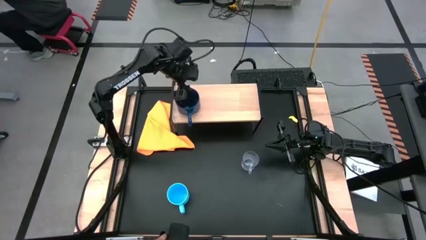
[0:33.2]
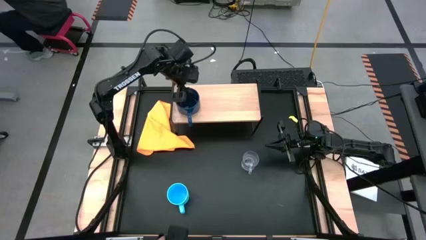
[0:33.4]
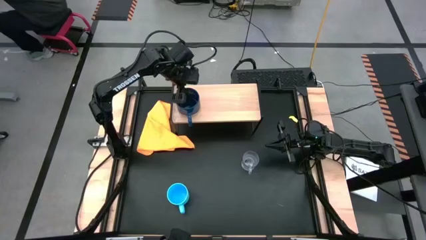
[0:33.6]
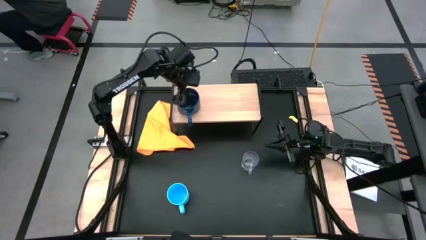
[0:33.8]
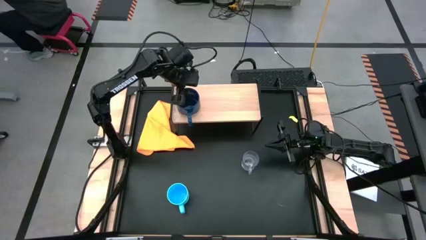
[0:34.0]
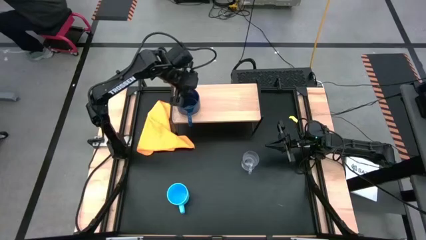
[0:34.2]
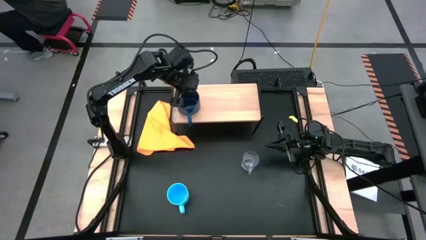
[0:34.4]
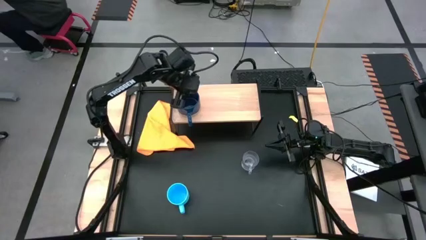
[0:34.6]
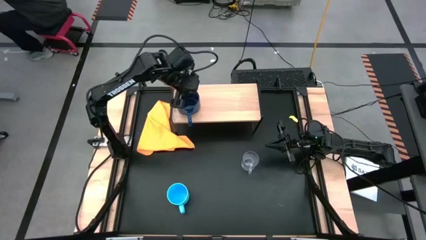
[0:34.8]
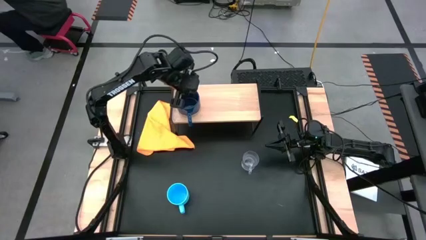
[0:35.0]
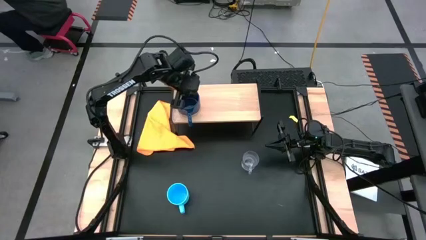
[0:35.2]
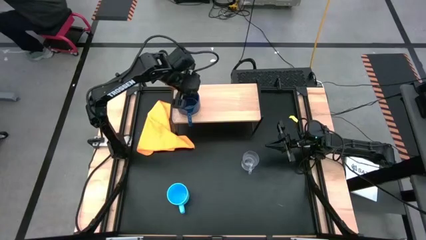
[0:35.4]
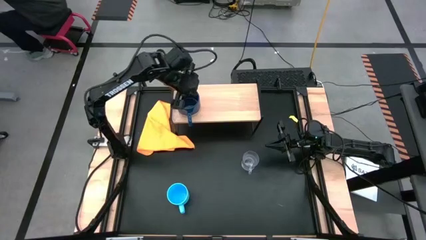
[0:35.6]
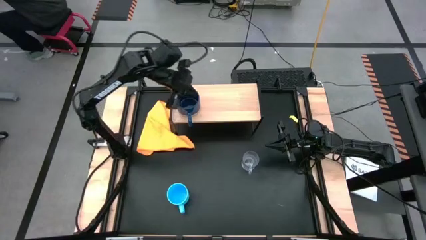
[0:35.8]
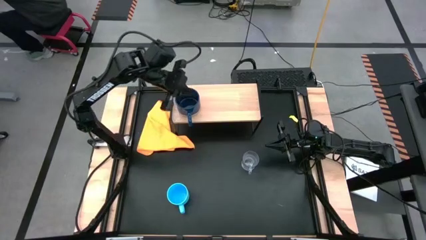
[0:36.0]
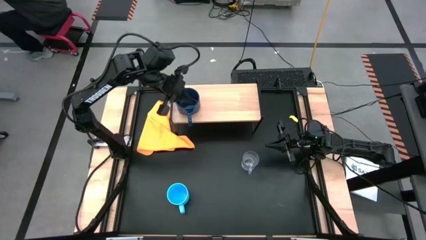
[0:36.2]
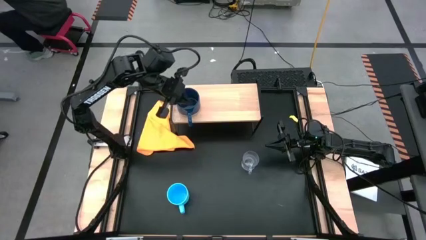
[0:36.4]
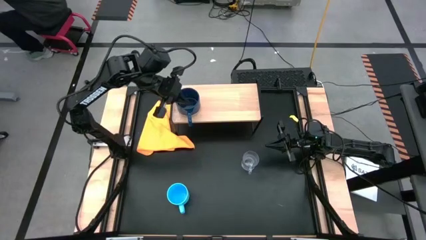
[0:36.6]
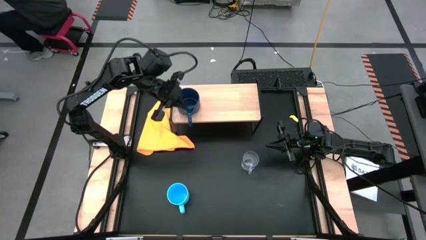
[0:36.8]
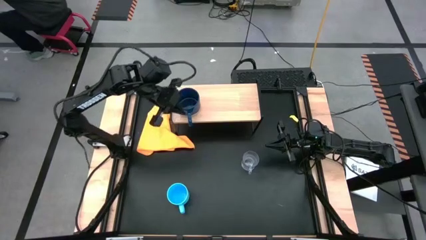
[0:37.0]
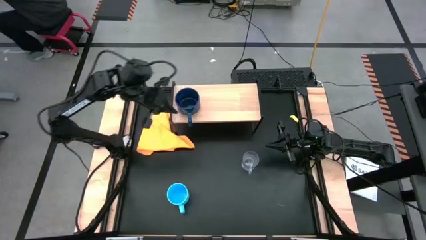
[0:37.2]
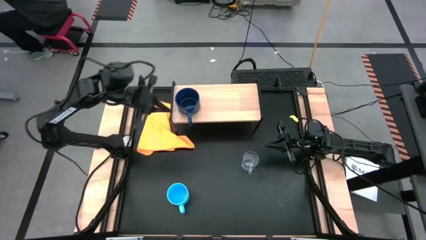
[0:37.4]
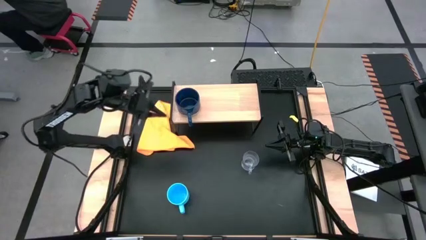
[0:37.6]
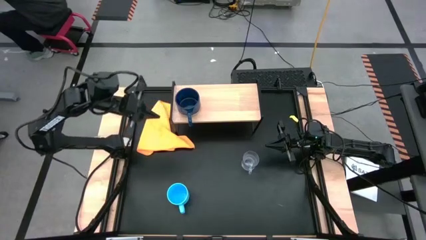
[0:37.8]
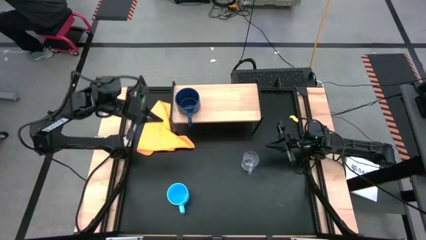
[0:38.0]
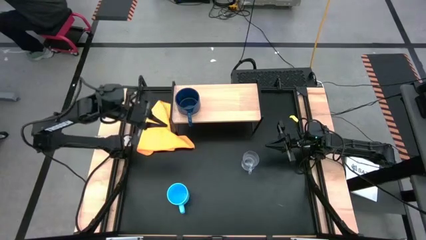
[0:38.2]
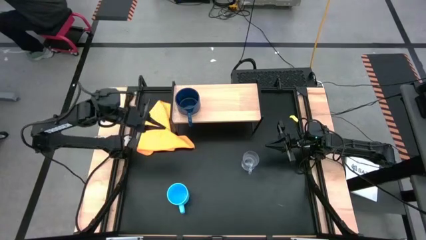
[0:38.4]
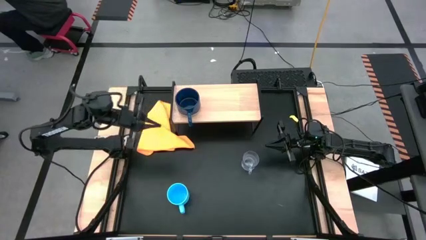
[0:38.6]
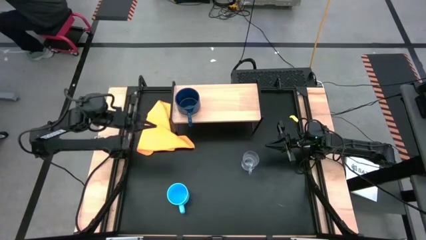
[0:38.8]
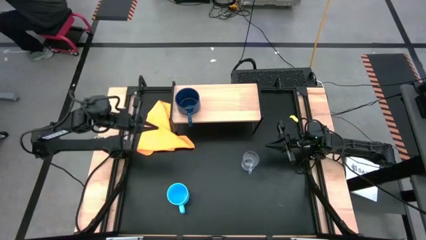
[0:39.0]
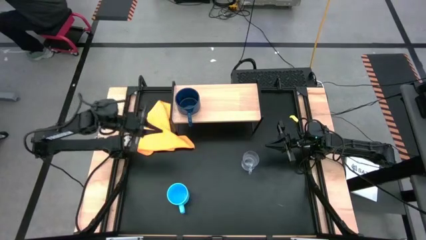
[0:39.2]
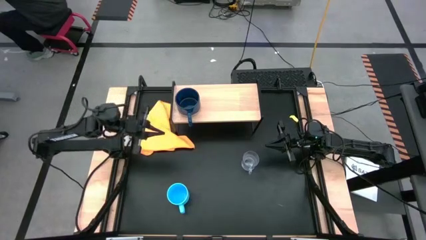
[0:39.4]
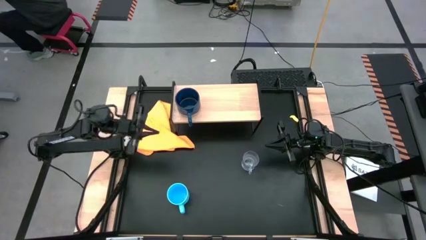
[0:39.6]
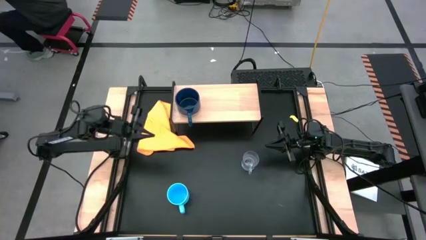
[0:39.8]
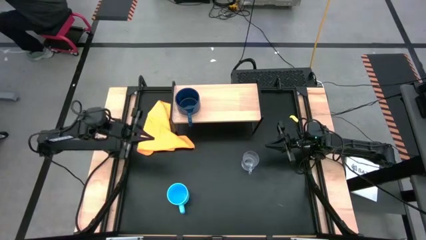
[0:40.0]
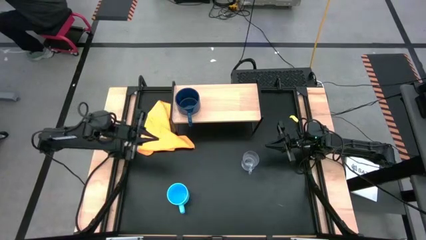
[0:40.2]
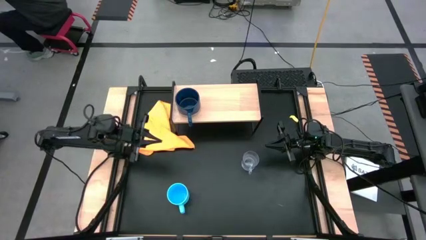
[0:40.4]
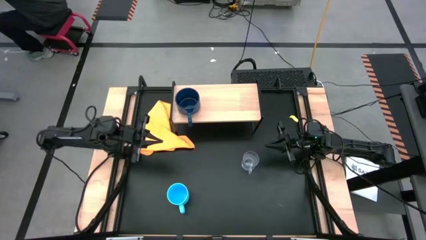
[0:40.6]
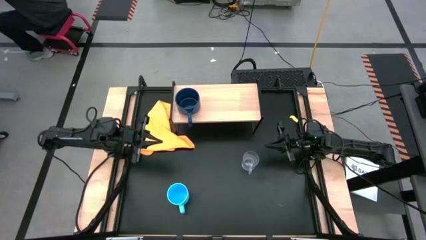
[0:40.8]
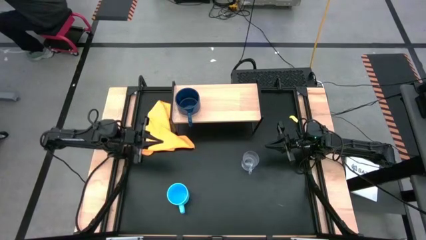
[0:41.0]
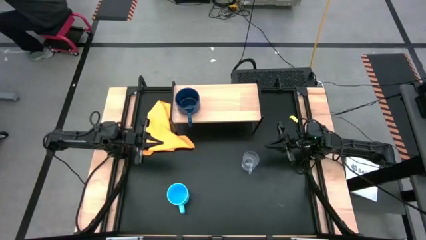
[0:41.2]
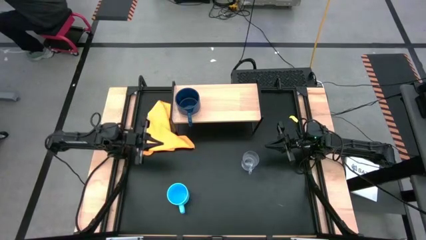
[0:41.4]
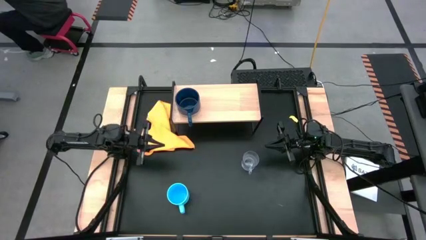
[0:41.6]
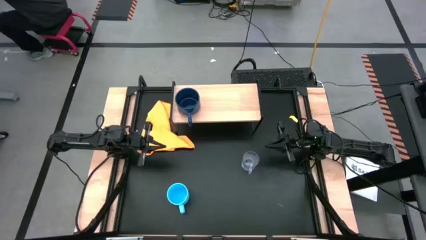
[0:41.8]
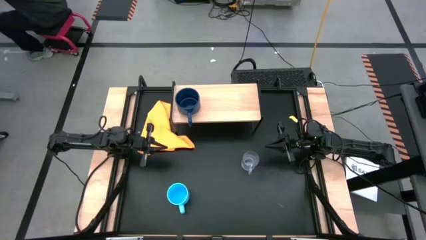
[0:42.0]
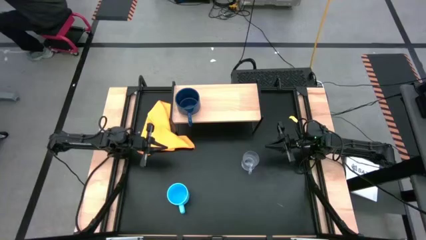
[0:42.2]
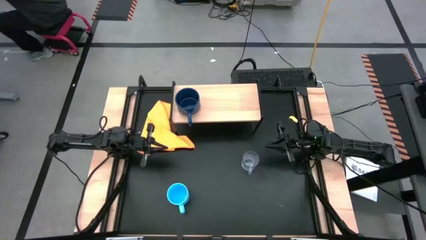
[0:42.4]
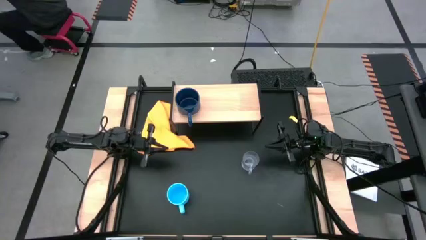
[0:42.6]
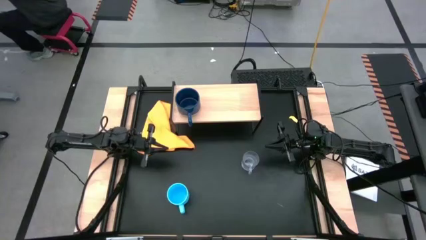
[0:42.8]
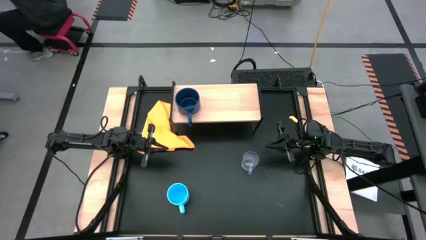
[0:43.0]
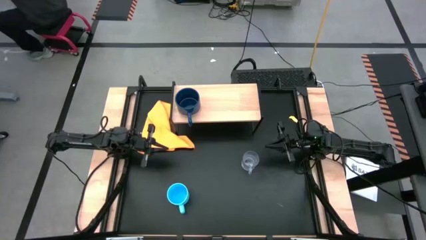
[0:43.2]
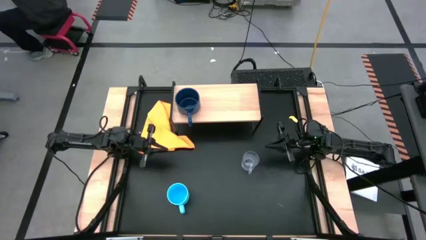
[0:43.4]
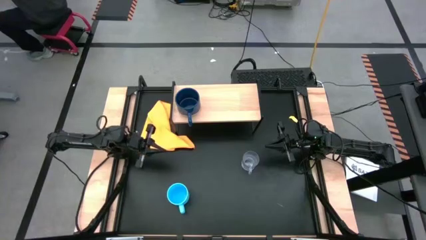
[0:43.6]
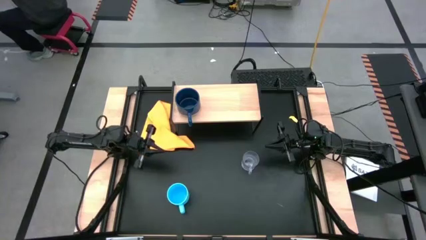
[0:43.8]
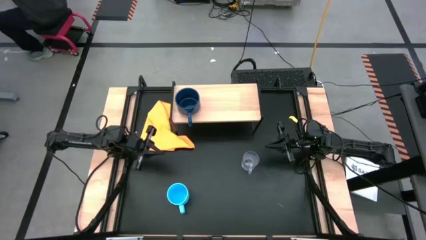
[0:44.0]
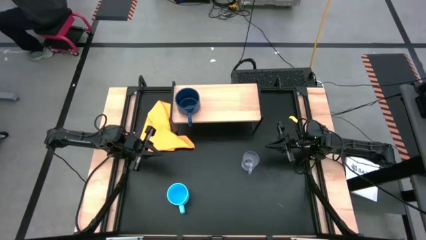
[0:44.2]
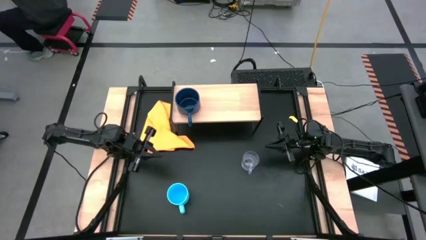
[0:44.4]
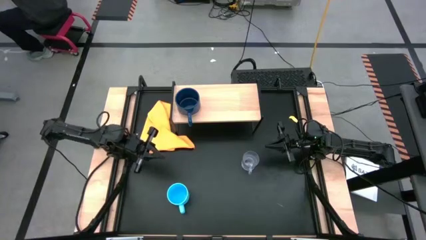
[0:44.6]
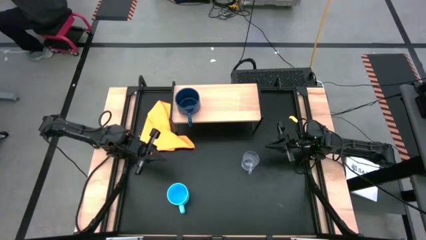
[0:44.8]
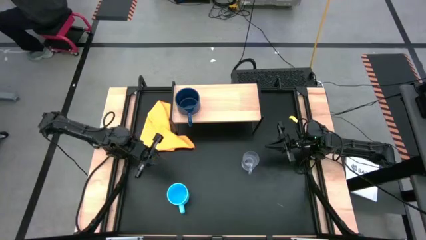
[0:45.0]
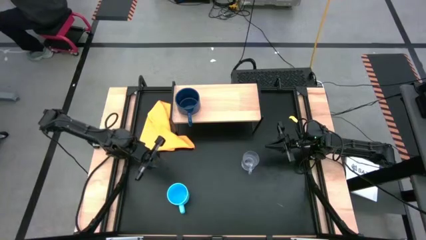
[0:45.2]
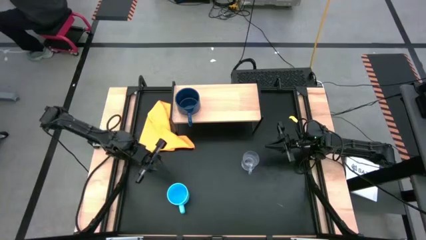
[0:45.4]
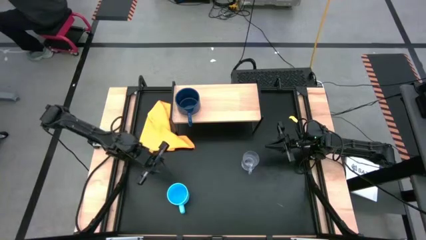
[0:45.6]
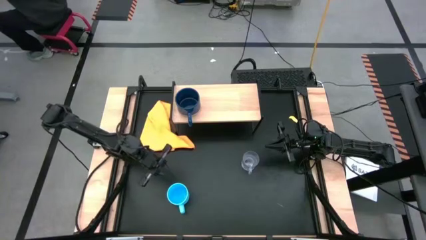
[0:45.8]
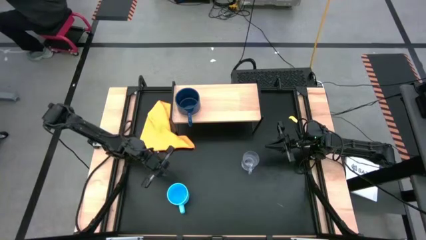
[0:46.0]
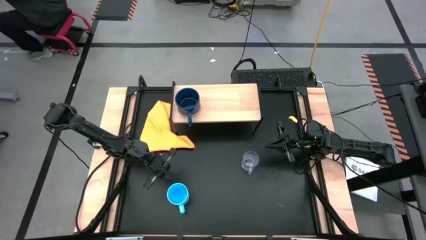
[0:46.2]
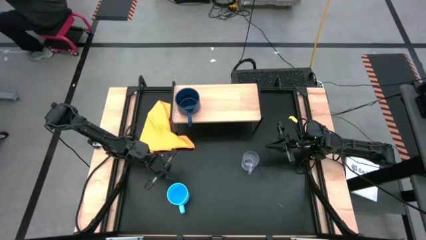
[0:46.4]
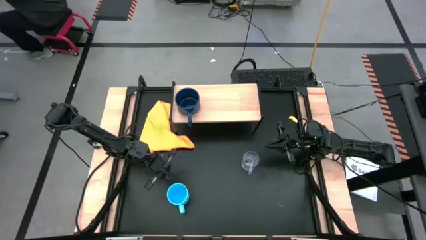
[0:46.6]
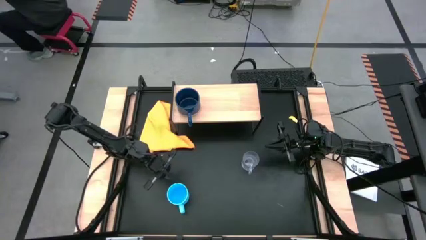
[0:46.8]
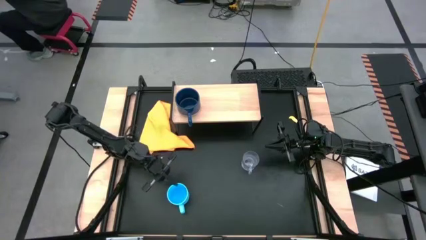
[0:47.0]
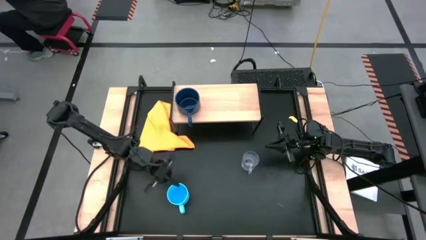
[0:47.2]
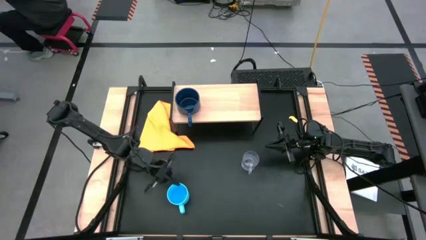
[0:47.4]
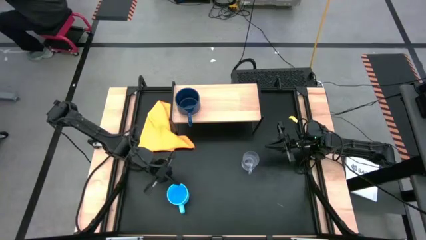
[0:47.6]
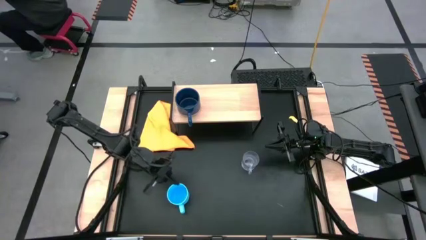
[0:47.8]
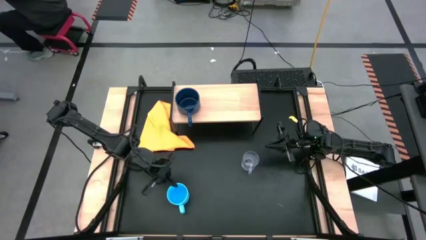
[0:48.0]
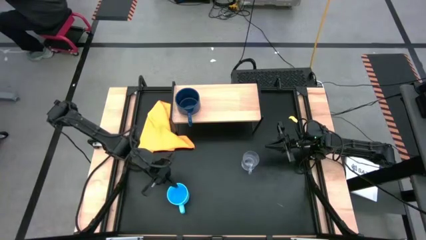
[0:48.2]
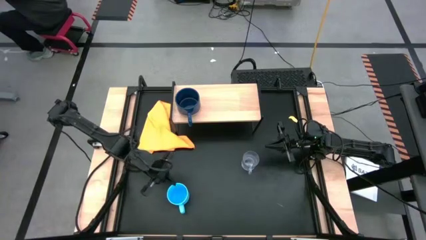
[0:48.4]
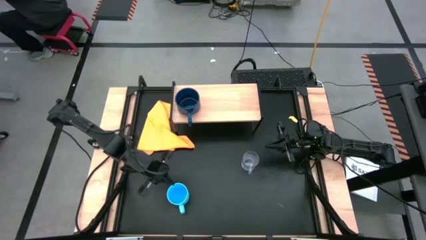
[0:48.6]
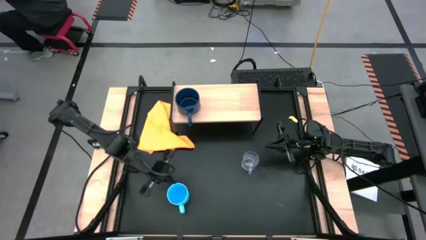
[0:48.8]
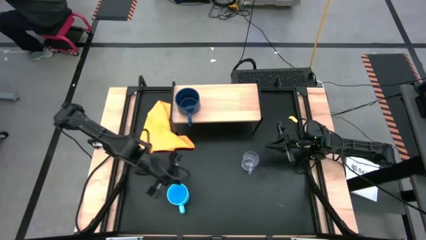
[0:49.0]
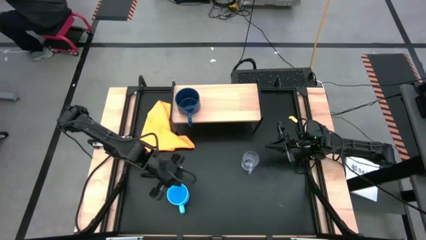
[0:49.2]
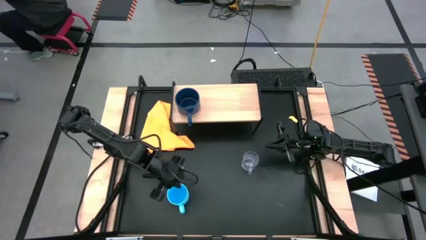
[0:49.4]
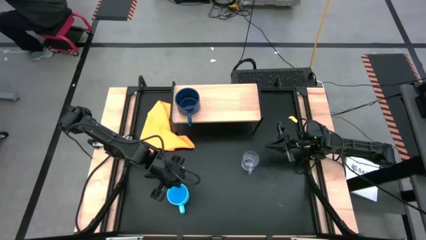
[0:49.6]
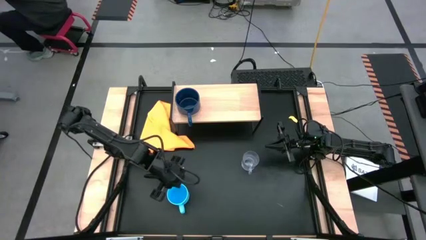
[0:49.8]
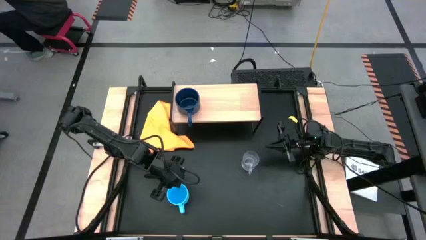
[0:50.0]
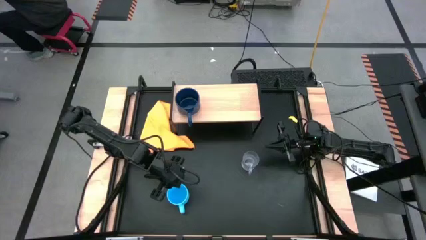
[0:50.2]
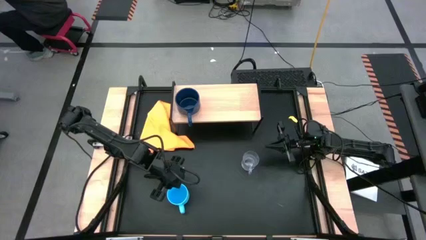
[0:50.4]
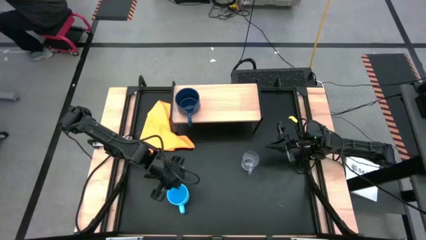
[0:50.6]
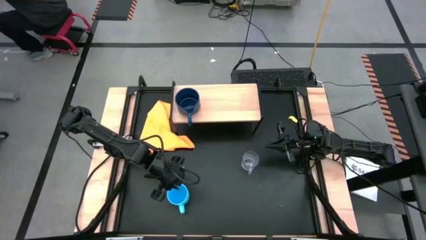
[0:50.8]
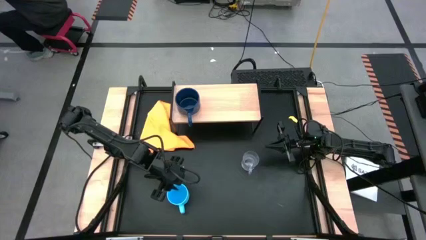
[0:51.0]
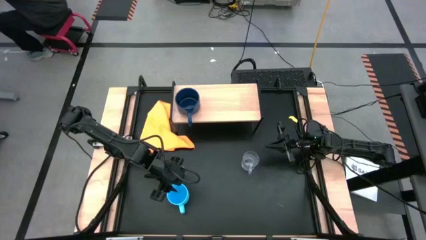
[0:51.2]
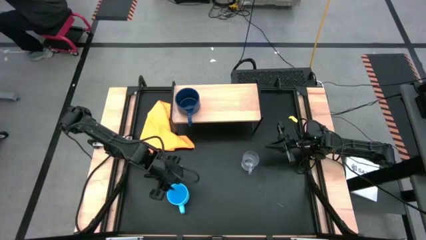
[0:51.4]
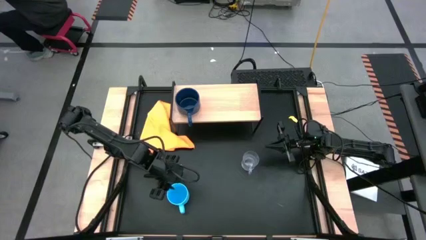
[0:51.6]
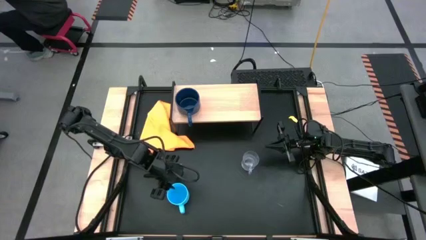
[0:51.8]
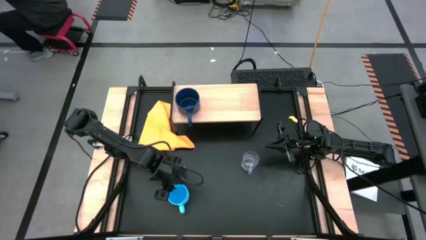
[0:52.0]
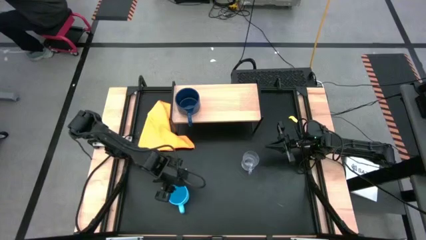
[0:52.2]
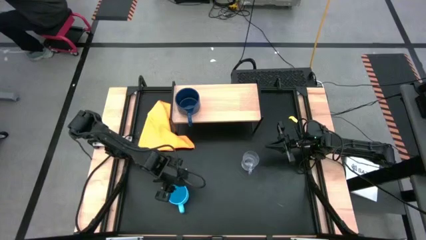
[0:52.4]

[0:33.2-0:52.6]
Task: Stack small to large cups/mugs on shelf
Put the blue mug on the shelf
